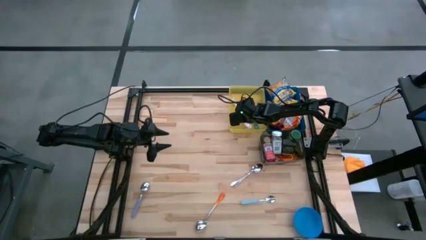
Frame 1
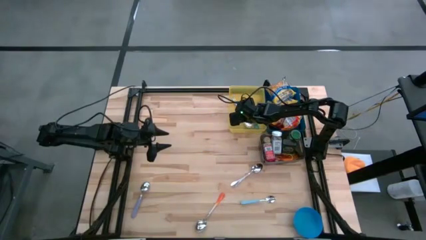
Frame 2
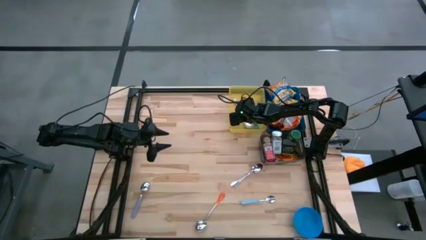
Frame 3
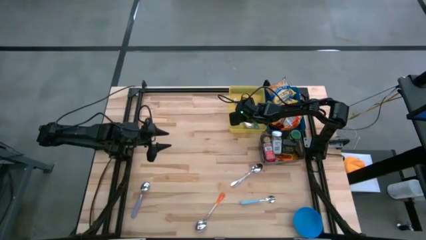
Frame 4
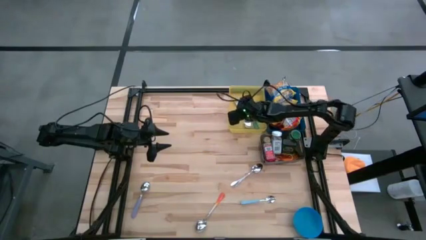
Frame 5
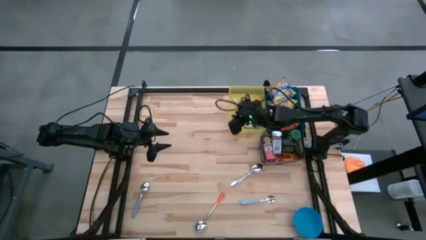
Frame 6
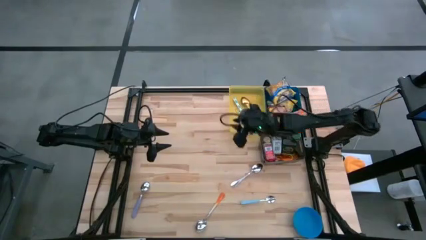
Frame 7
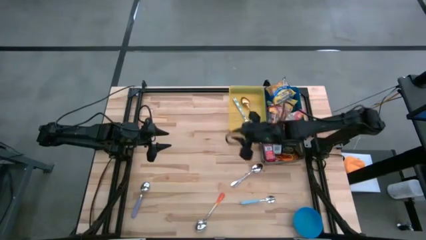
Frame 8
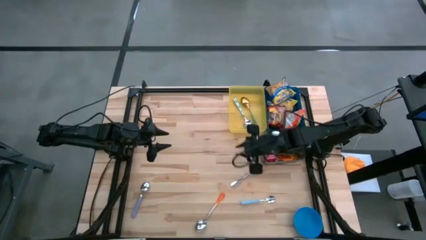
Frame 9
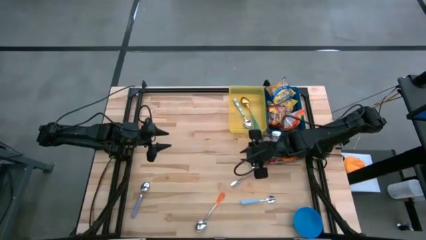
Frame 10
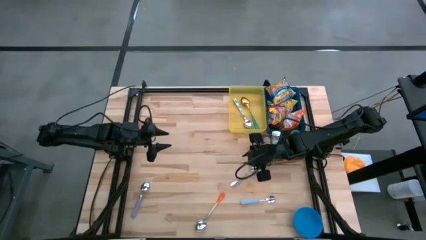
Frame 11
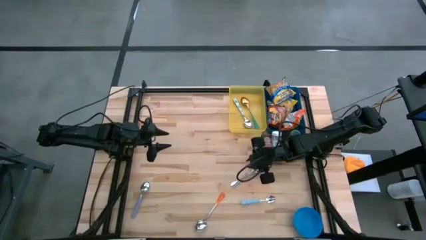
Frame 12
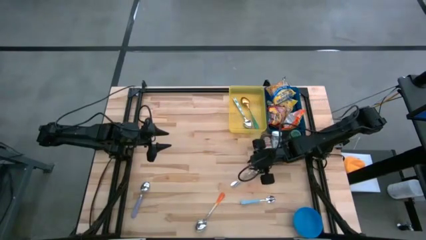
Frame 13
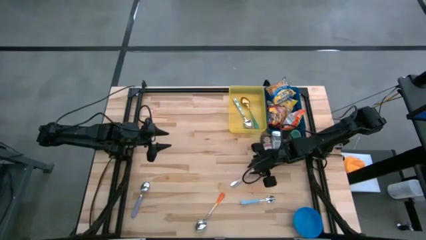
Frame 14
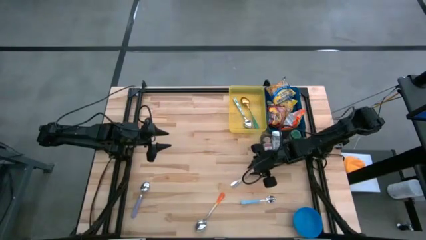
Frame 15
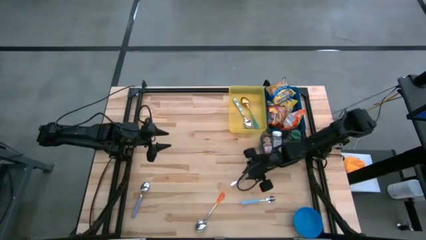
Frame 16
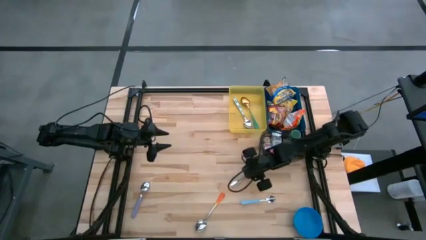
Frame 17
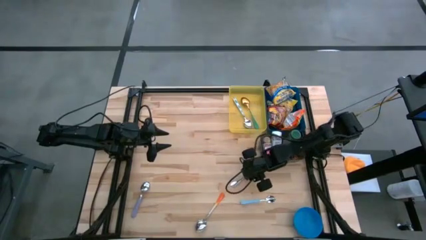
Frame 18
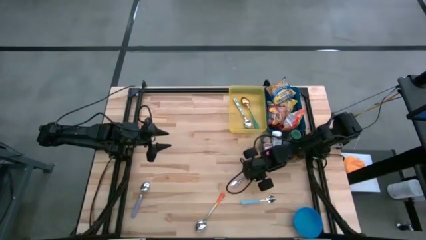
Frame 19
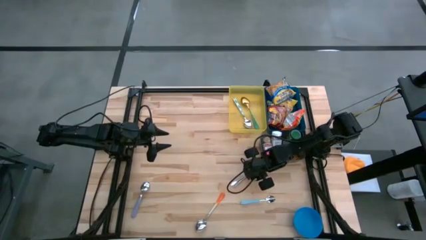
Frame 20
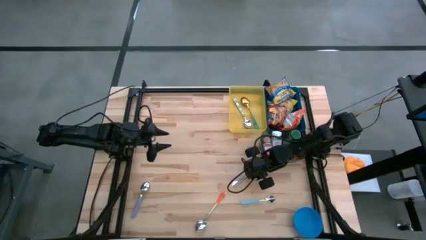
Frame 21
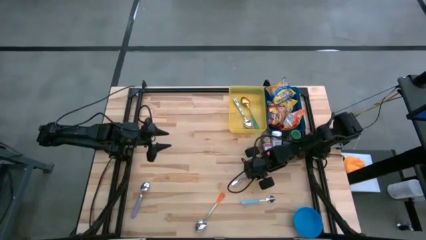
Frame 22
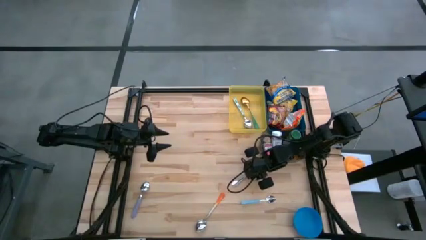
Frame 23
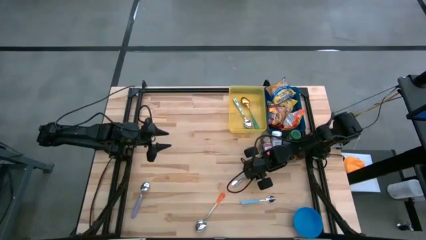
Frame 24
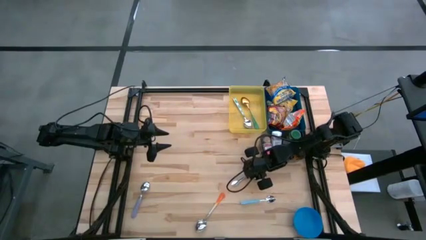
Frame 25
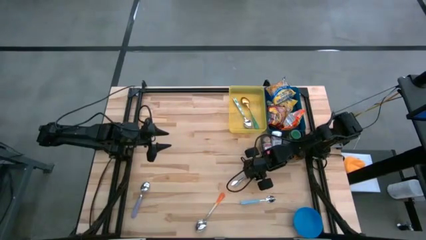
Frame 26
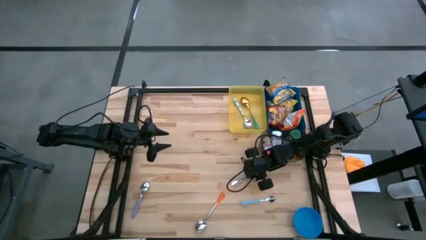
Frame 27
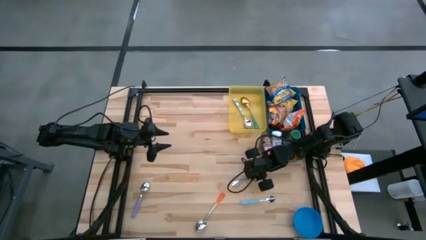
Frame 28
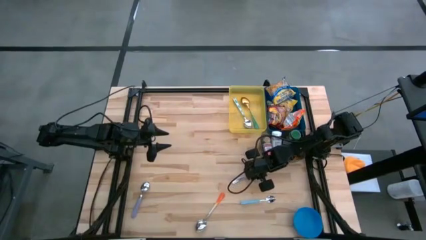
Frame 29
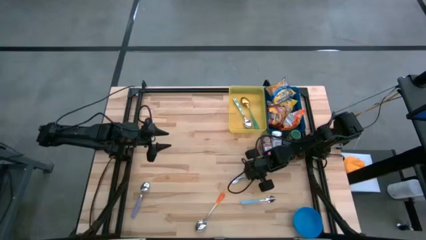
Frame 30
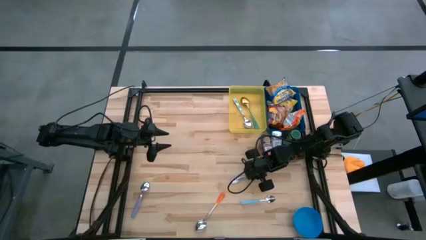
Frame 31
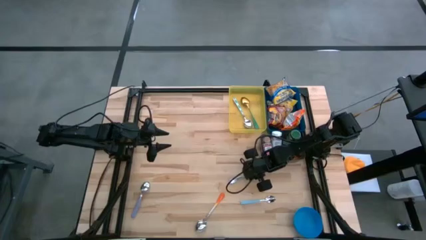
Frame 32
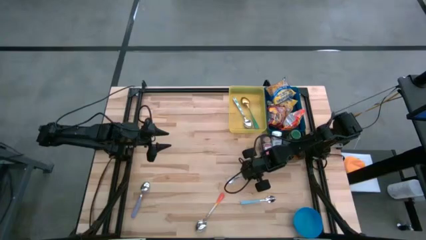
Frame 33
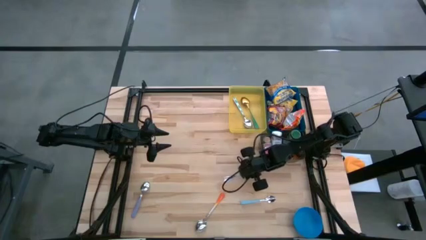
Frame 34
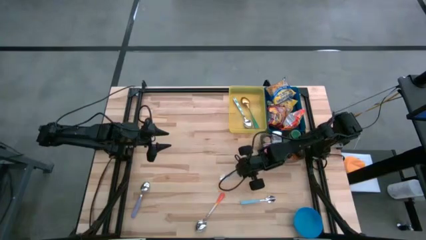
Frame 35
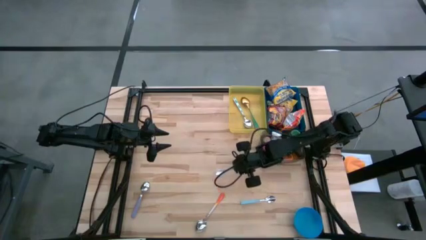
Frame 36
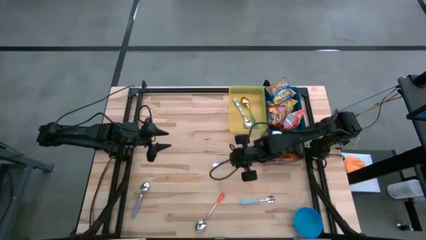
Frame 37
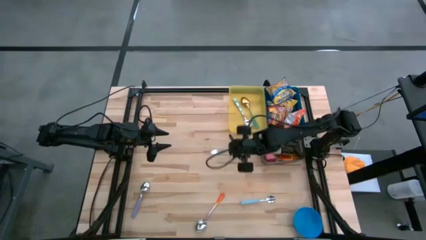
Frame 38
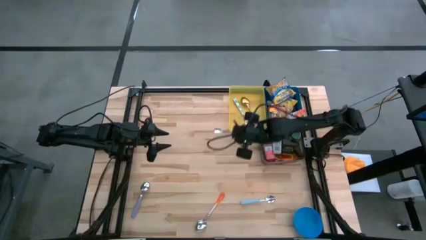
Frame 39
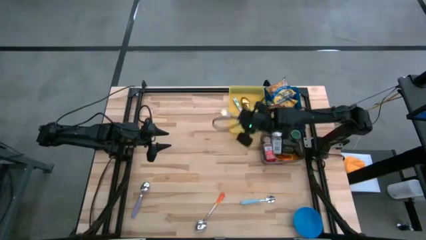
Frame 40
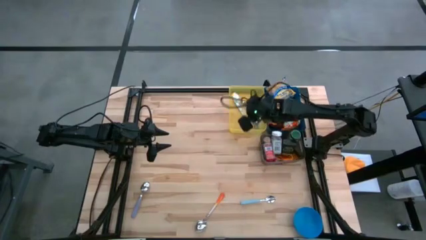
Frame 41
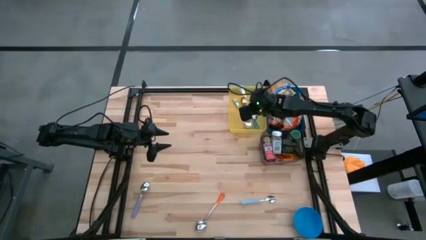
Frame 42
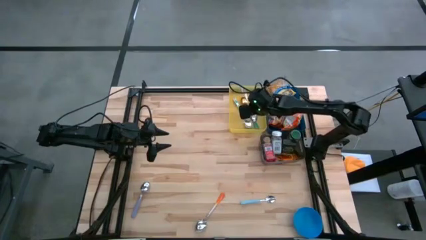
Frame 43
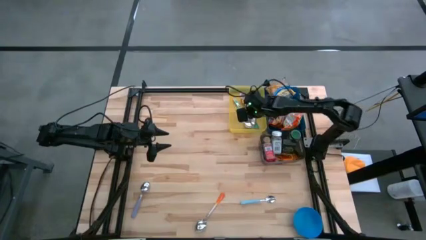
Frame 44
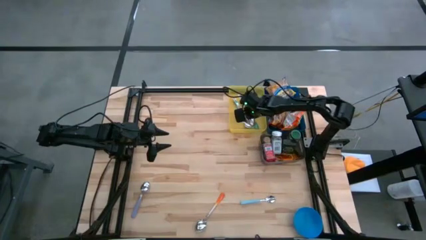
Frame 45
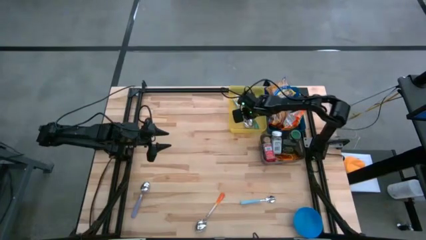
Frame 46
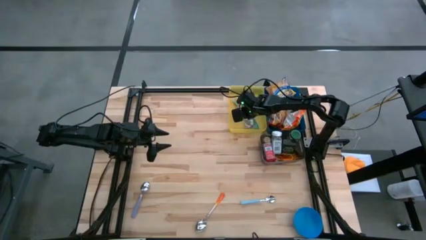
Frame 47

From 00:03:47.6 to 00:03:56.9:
Put the silver spoon into the yellow bin

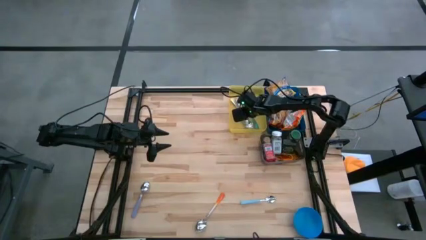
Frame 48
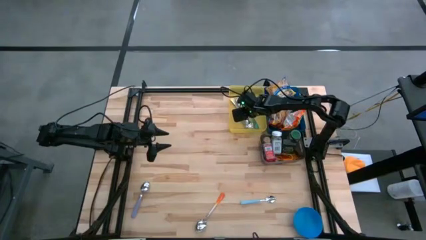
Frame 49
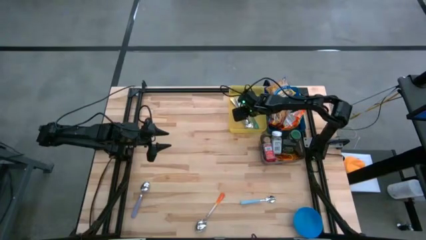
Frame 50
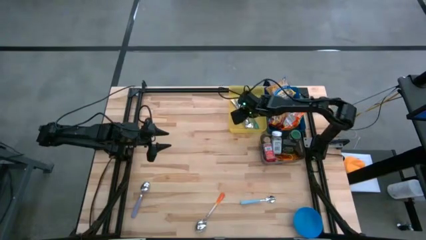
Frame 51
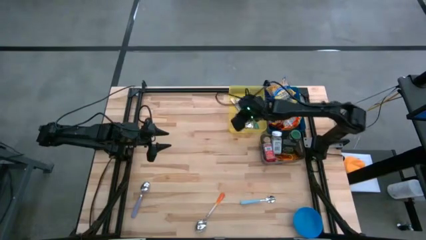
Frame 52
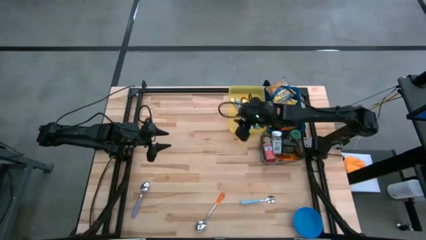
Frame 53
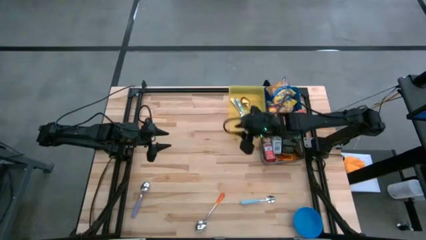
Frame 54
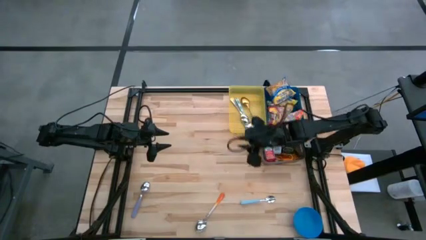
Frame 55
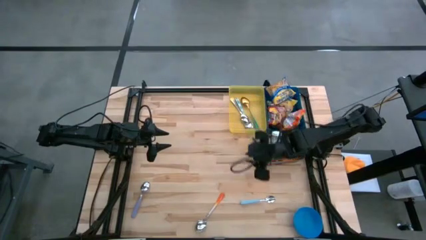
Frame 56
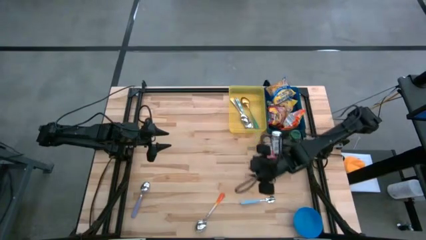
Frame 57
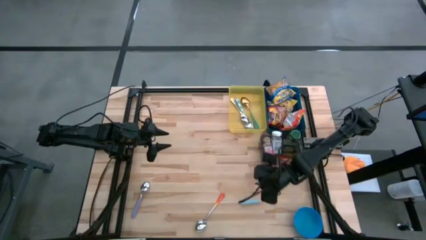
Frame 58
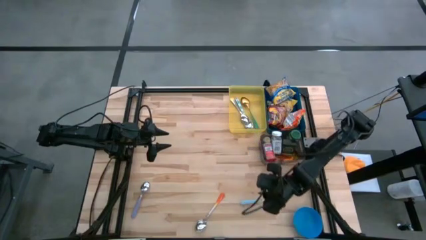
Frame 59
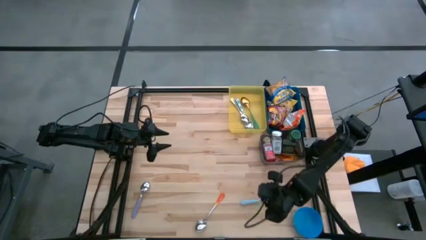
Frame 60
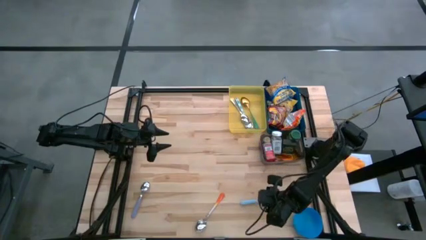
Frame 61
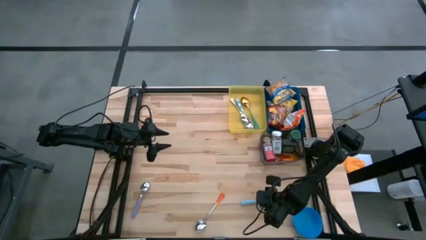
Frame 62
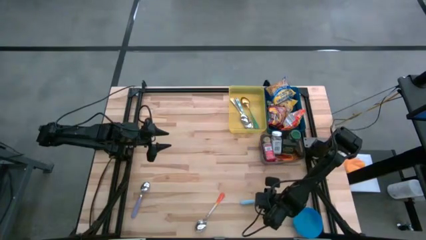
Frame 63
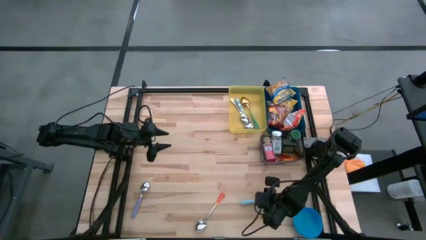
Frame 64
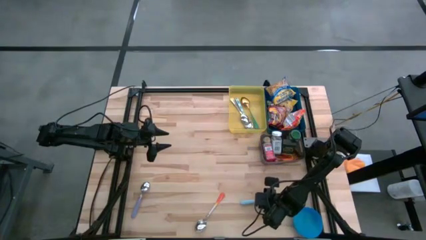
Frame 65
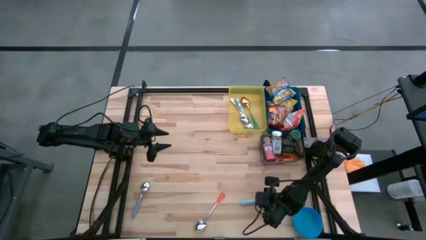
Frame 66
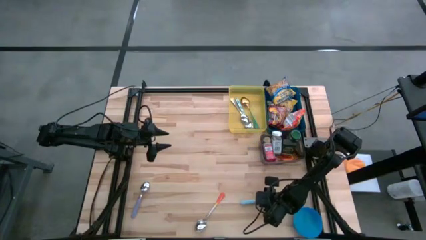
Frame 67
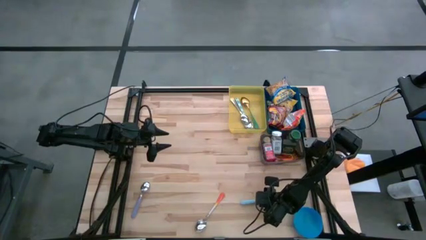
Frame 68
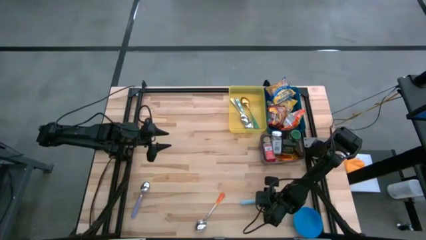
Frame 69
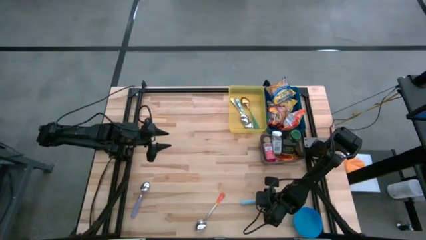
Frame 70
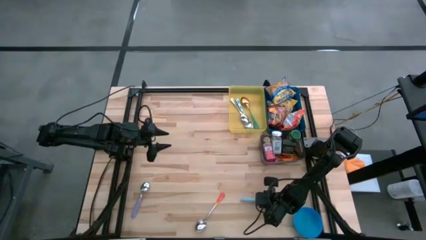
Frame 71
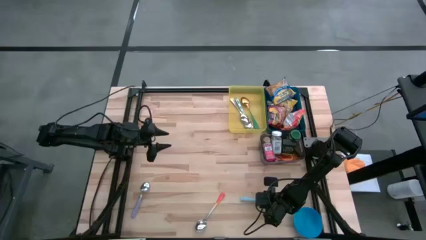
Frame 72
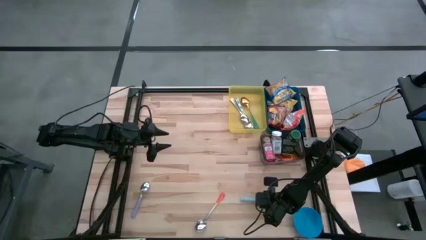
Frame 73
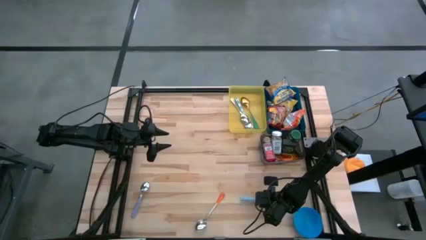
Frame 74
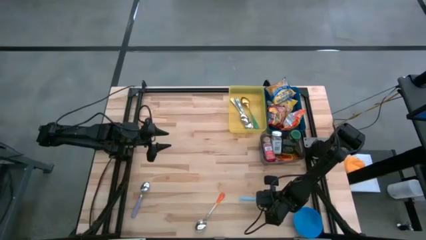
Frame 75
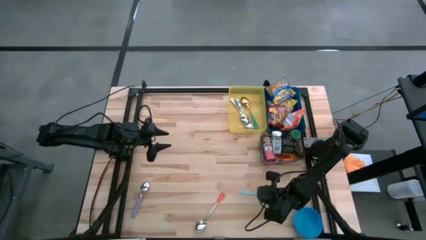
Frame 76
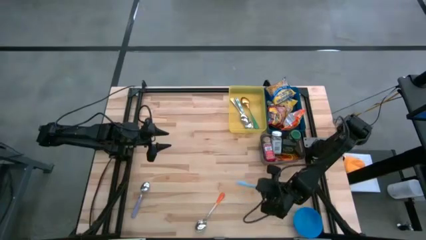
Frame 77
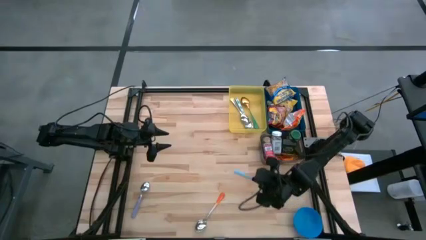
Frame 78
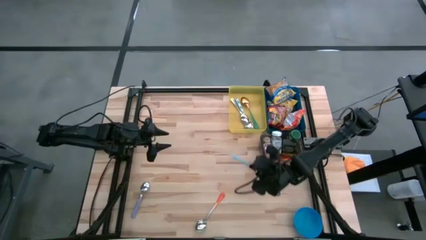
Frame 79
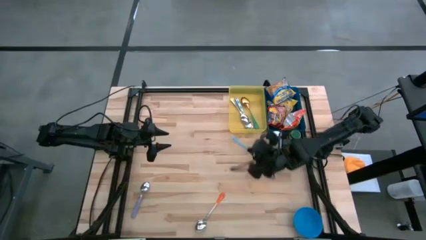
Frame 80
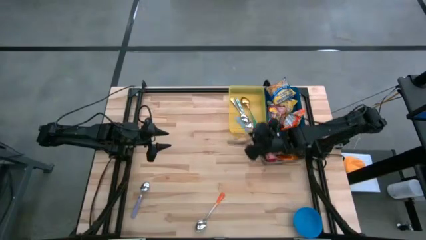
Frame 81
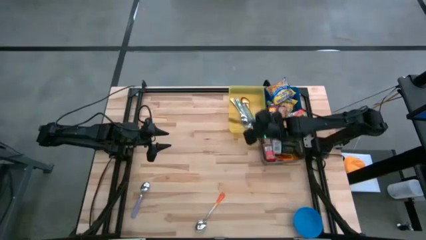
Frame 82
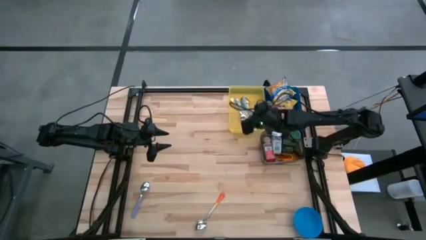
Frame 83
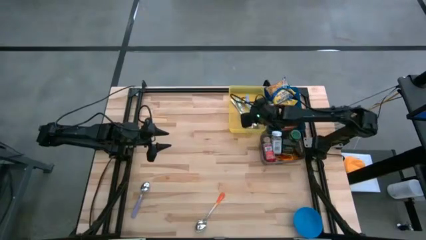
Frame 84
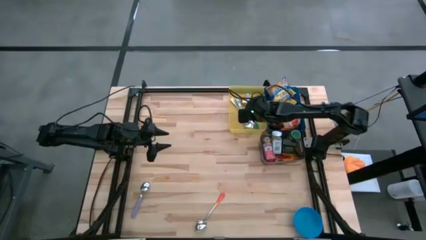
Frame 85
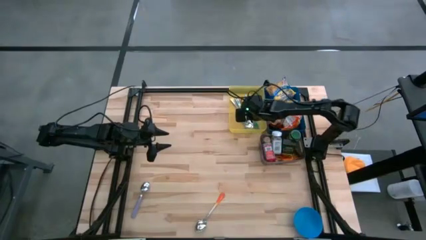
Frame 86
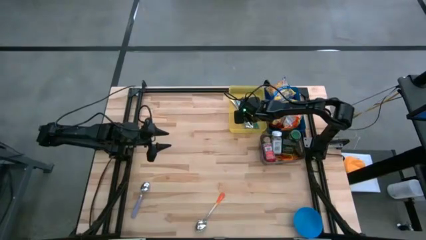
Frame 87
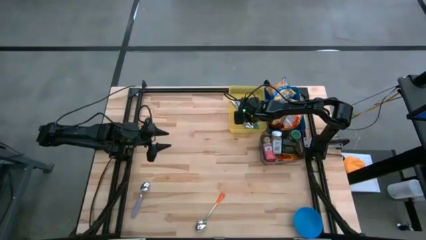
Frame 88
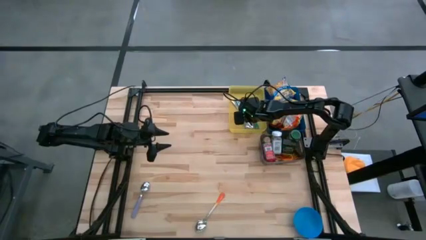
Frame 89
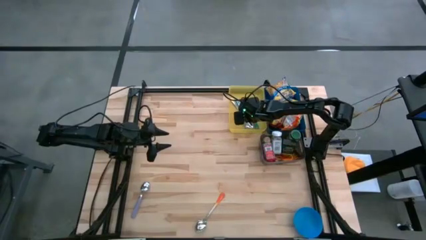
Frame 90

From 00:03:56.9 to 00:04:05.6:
Put the blue spoon into the yellow bin
